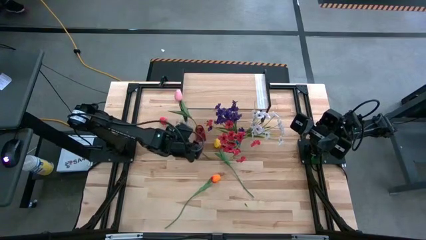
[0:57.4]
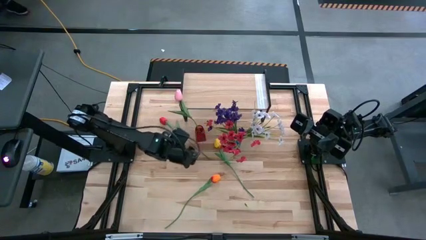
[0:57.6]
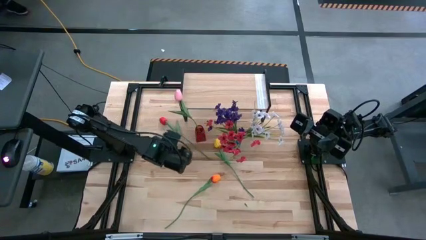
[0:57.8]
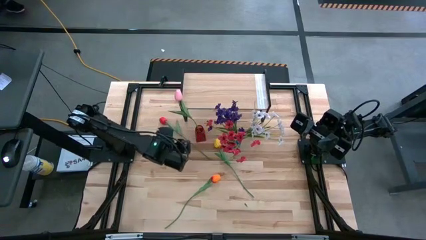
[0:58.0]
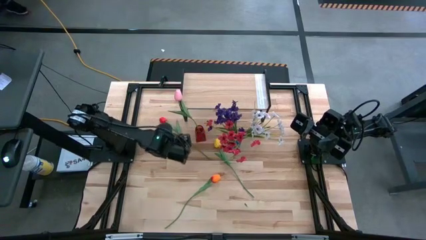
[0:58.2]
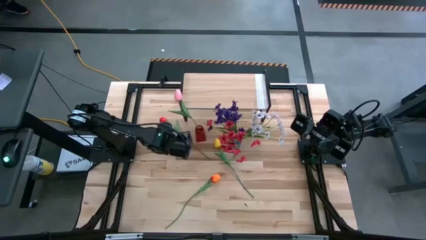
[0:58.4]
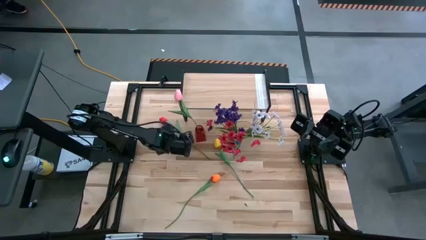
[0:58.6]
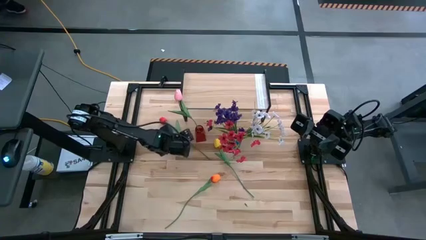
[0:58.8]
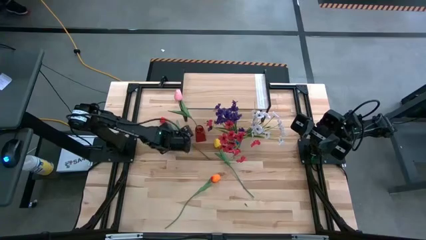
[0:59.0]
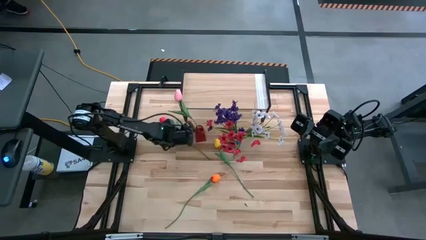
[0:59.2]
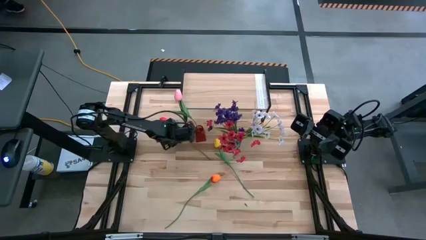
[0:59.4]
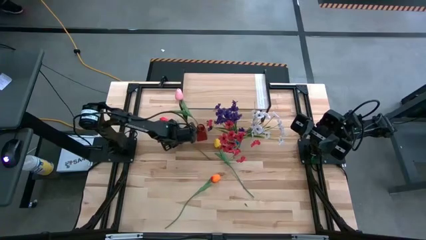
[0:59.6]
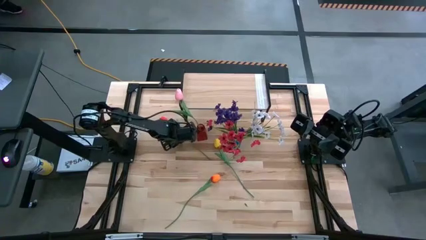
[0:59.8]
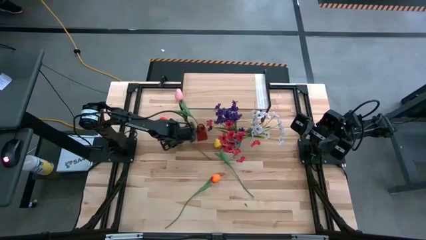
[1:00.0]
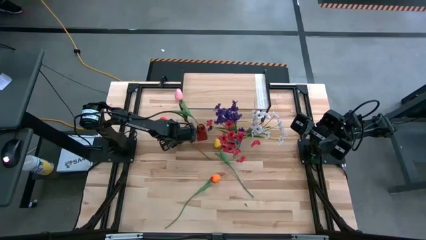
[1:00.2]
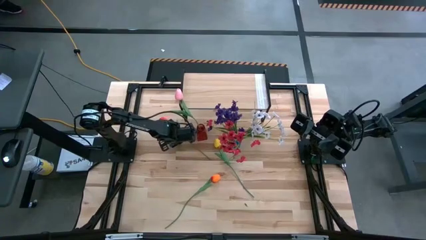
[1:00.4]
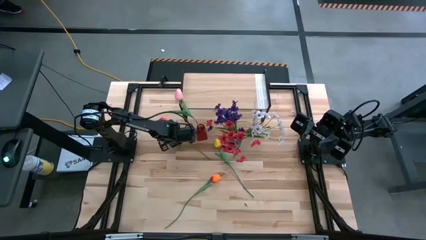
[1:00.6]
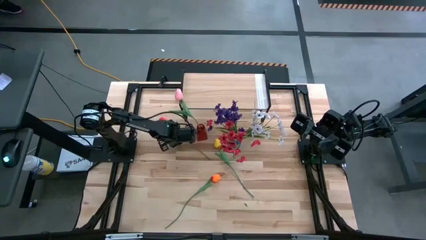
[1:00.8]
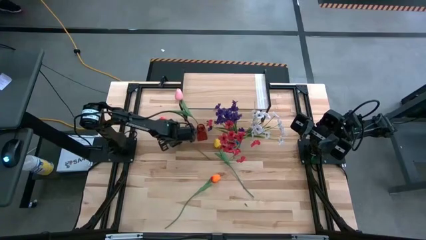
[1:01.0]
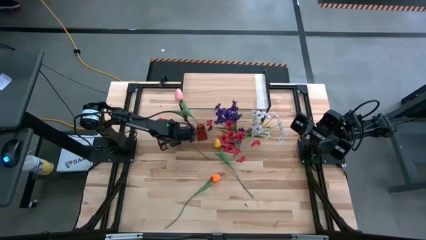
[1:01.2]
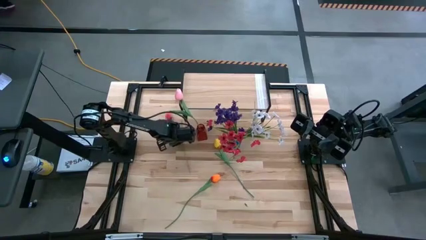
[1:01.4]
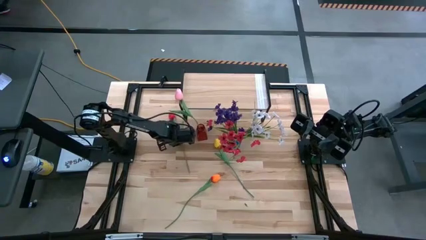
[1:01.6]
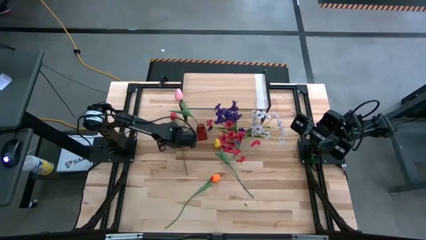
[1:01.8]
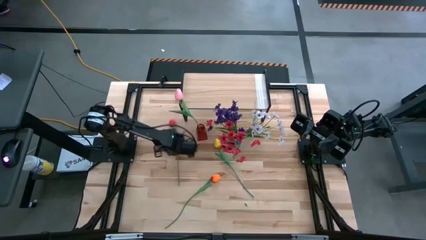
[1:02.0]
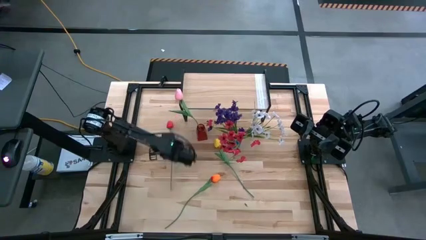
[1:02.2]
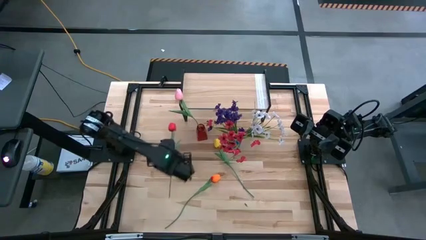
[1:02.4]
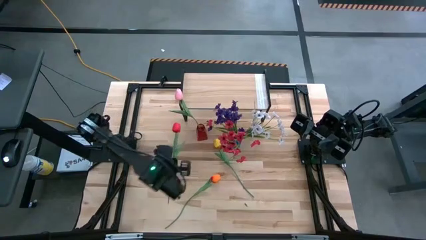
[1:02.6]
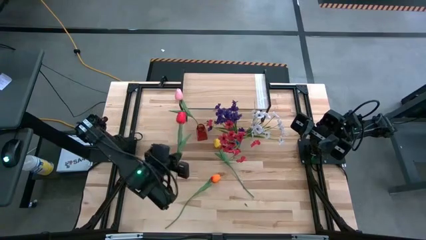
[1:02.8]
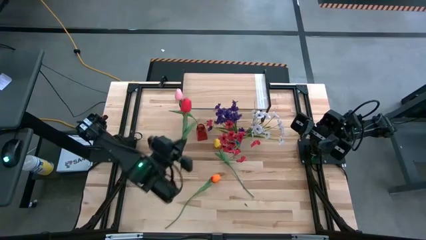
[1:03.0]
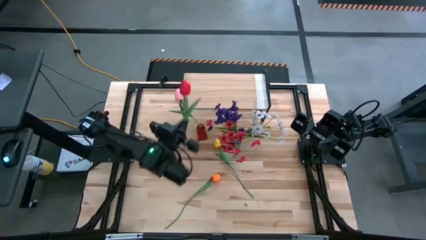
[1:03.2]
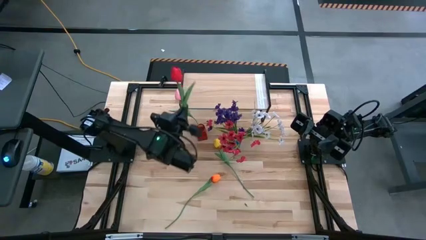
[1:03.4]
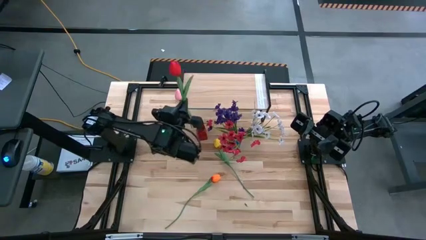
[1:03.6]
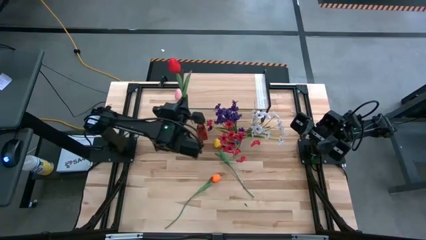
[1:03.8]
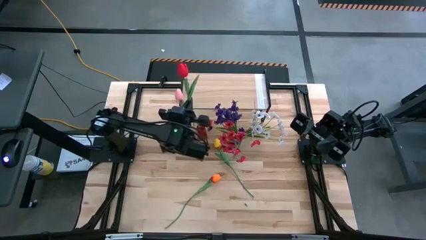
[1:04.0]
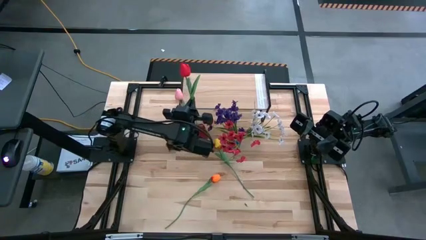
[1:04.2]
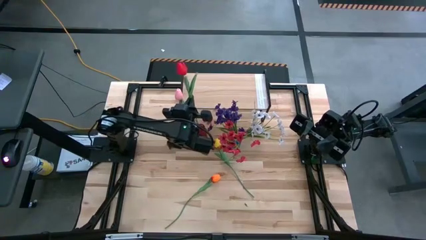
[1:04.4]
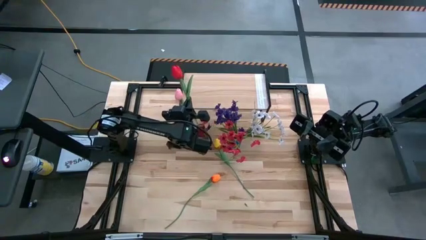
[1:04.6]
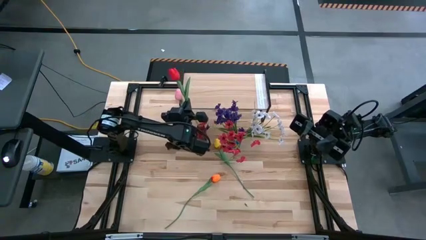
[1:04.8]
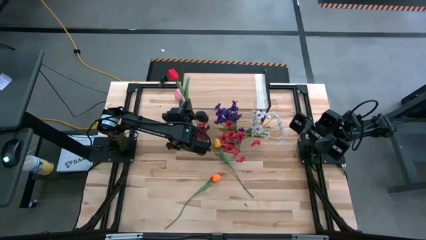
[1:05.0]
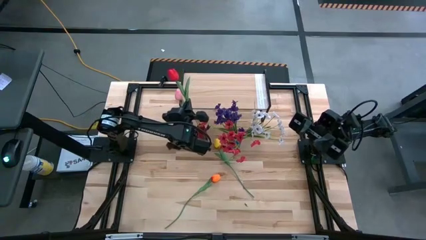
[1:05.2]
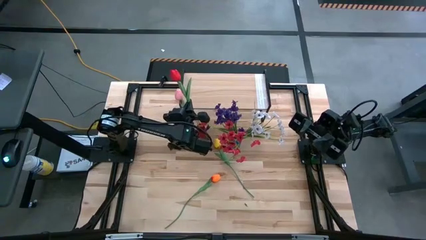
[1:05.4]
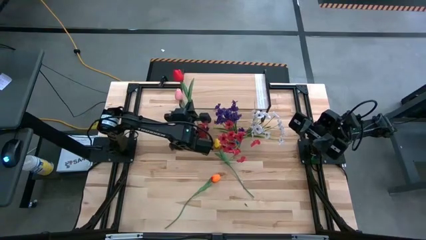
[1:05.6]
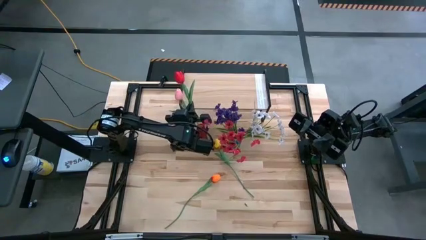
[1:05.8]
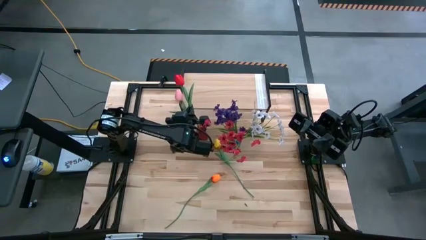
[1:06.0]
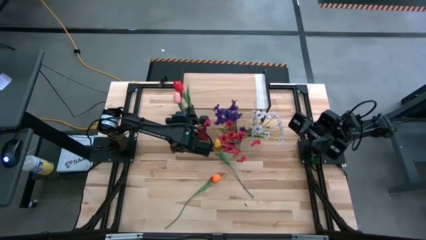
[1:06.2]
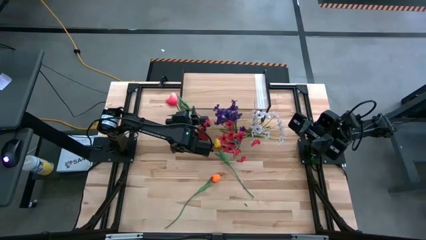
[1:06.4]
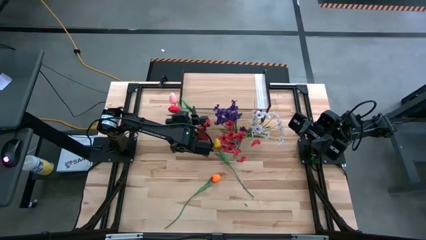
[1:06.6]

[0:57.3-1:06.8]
Task: Pick and place flowers into a vace then onto a shelf
Put the red flower into the red vase

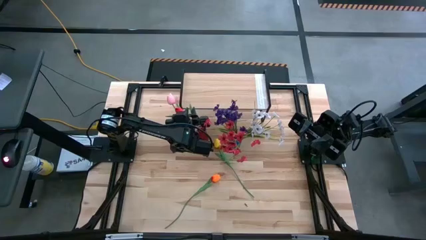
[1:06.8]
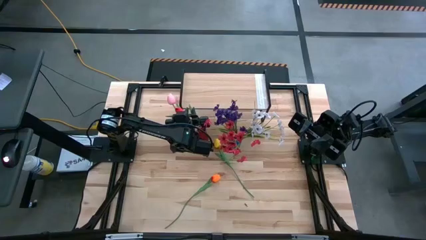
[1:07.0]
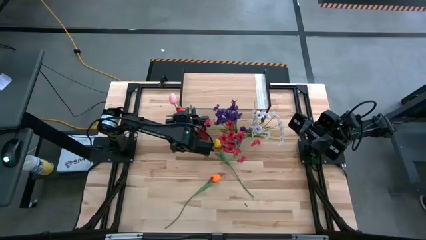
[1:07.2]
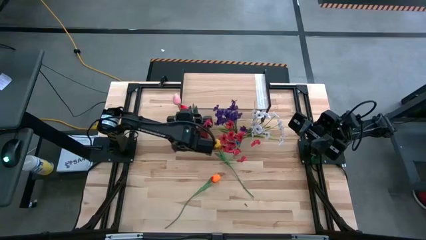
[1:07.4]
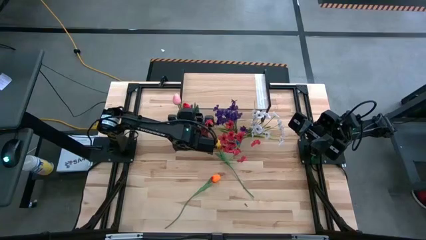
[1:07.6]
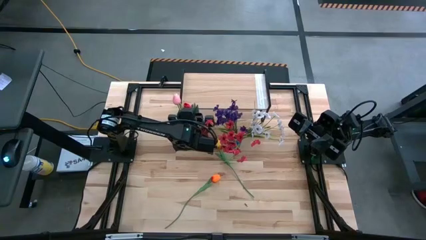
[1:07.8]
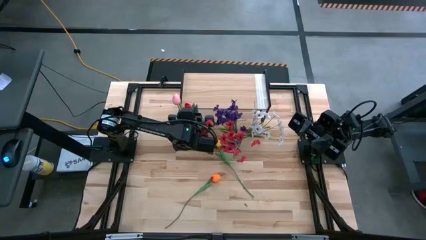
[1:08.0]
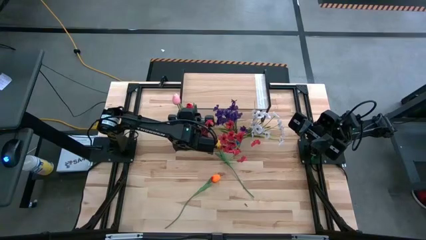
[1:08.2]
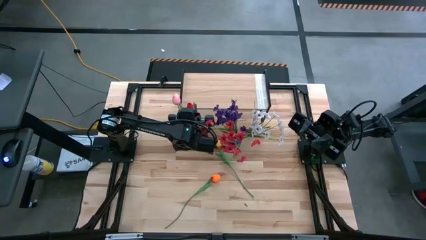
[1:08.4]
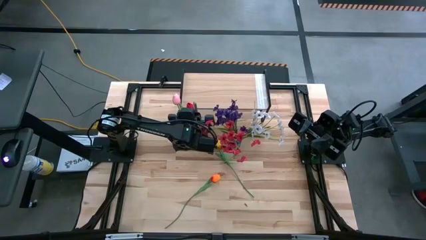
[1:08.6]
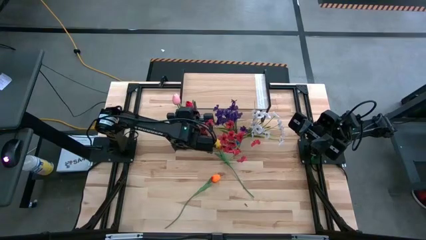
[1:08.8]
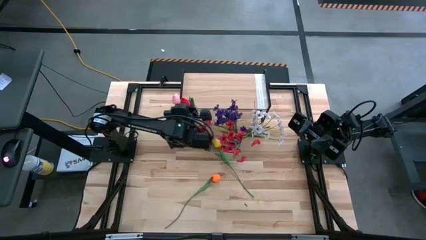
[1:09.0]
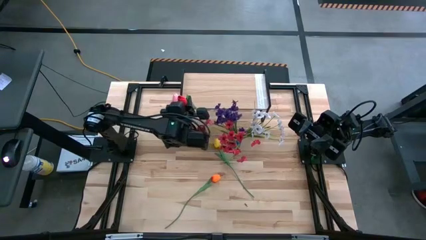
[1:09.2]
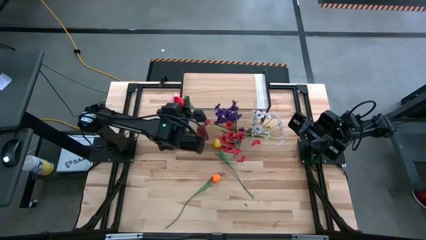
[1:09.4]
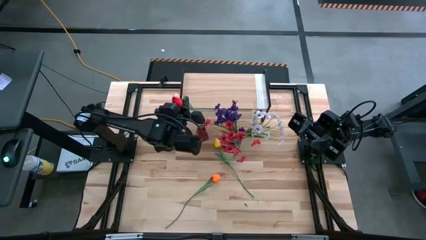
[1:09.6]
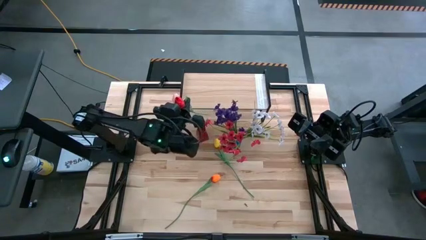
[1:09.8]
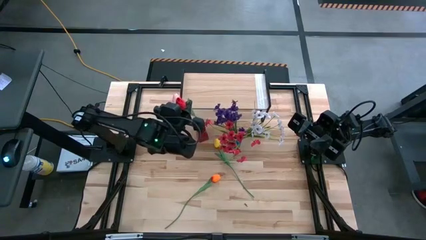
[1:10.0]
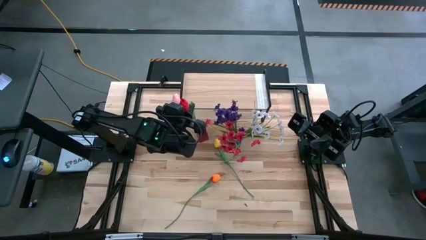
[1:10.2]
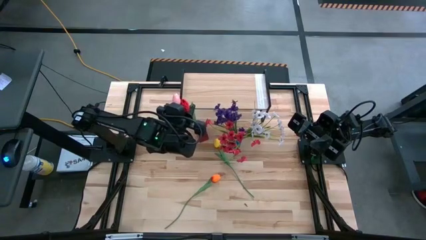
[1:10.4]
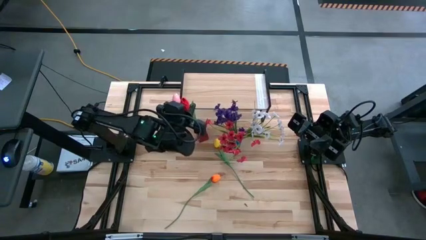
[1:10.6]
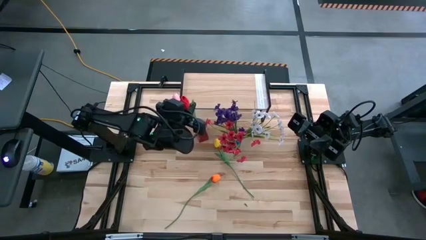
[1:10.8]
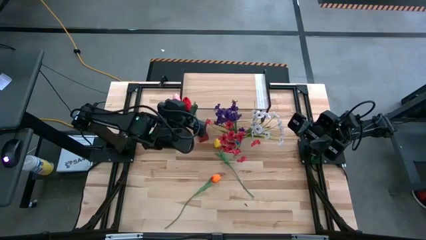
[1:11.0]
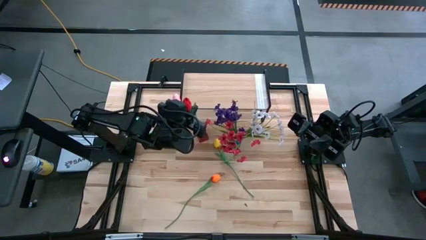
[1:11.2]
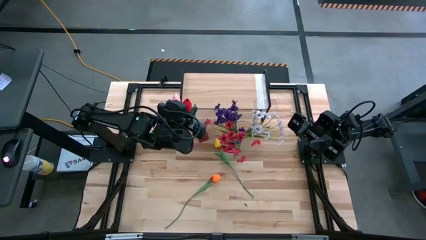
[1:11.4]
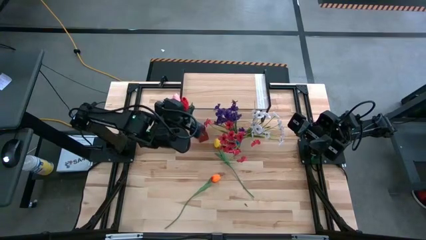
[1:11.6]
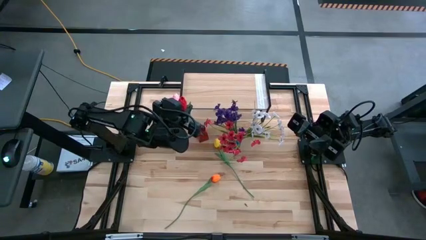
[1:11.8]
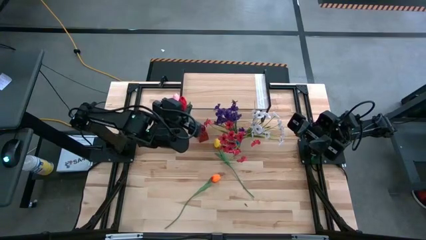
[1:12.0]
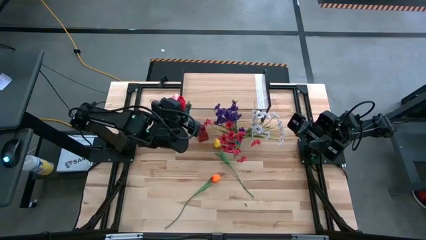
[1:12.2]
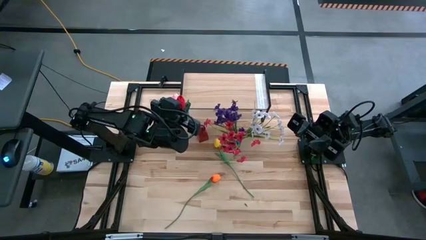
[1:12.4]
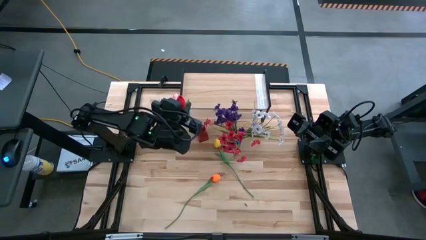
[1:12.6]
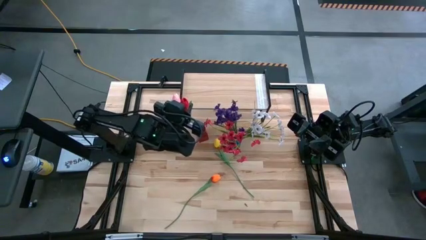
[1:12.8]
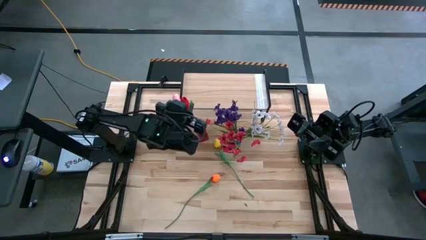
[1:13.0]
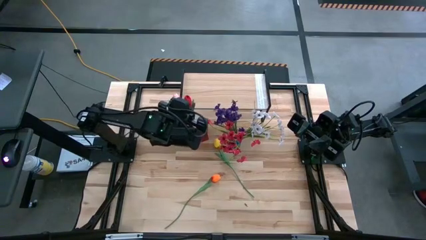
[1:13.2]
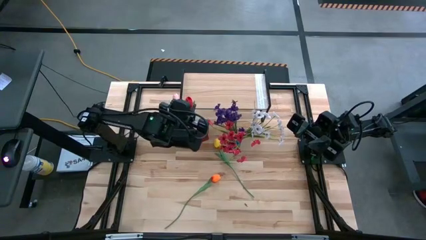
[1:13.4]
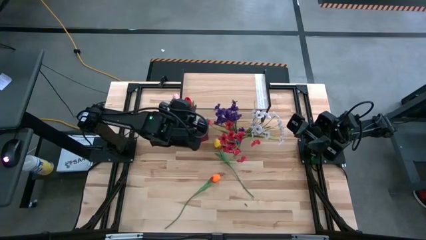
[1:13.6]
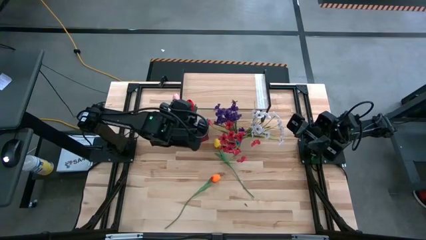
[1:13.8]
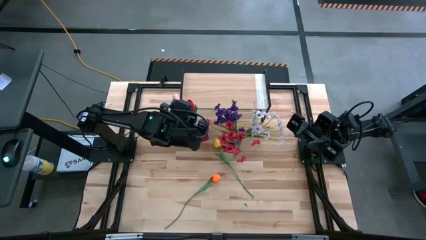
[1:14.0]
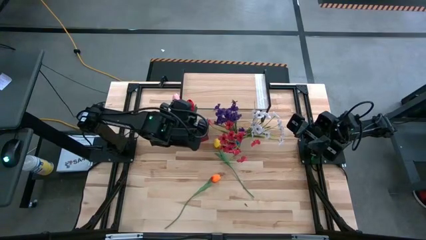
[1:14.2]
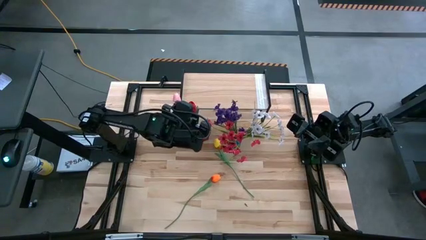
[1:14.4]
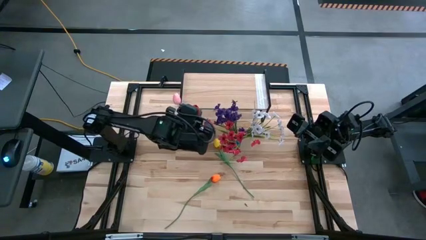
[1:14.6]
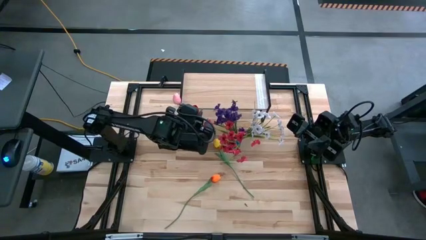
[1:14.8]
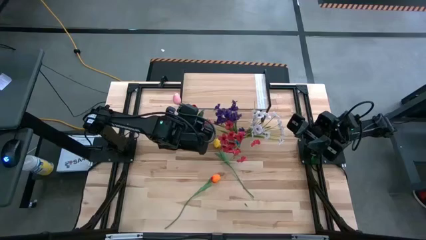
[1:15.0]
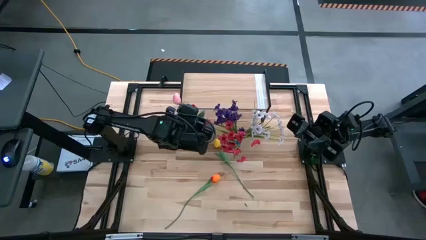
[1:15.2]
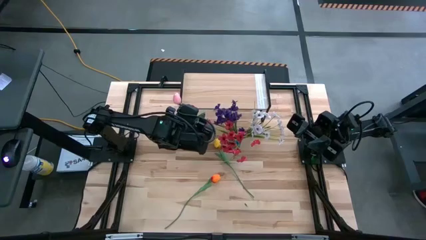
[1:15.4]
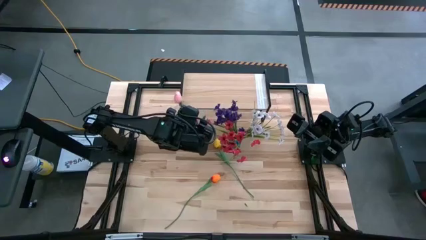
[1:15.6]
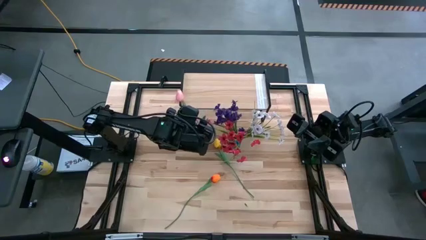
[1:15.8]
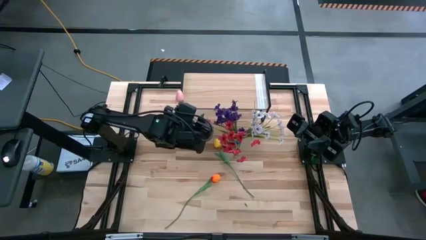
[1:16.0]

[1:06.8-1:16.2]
Put the red flower into the red vase
